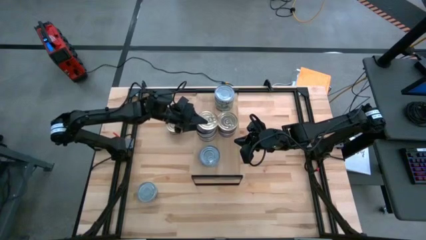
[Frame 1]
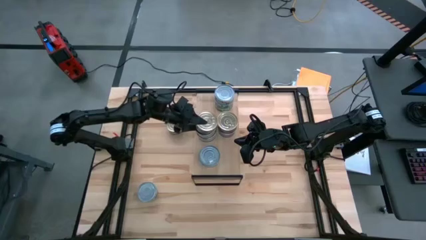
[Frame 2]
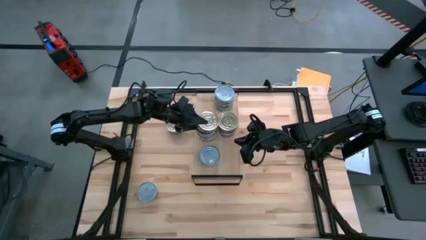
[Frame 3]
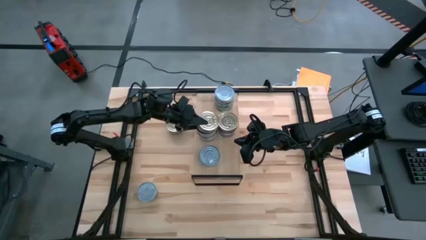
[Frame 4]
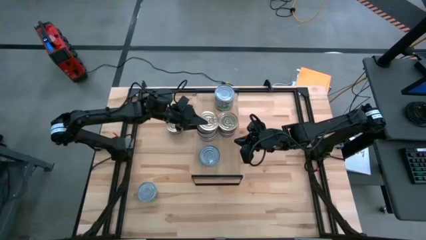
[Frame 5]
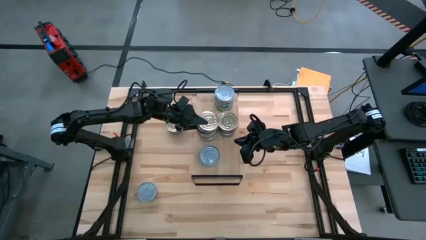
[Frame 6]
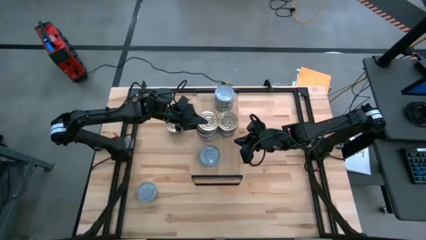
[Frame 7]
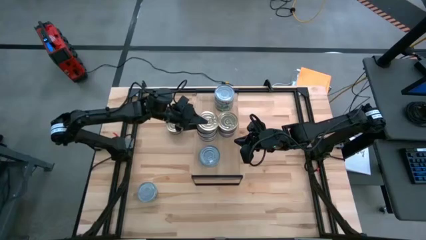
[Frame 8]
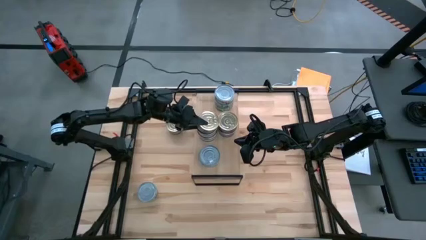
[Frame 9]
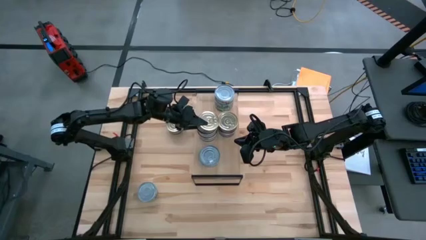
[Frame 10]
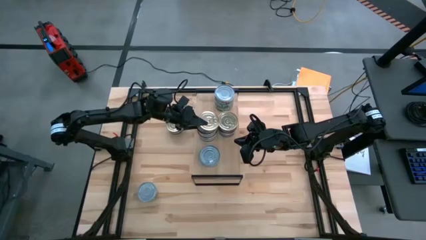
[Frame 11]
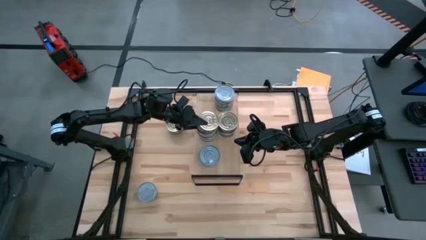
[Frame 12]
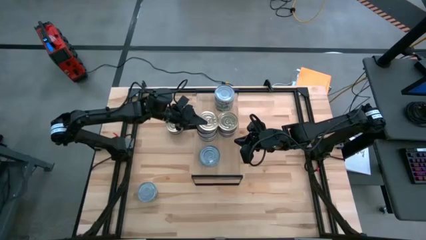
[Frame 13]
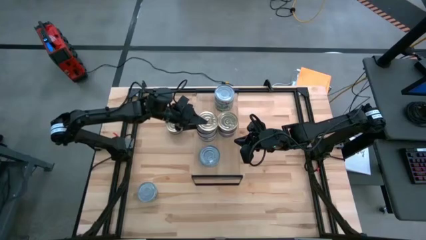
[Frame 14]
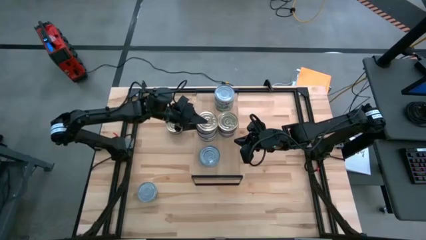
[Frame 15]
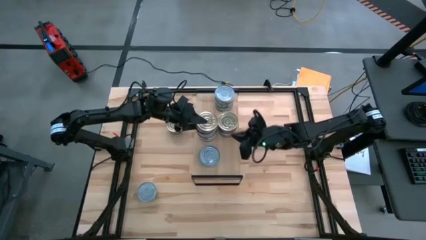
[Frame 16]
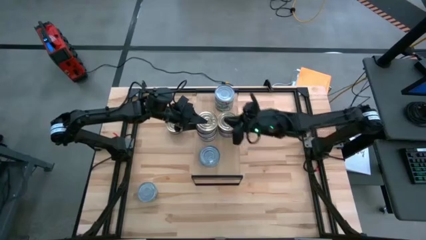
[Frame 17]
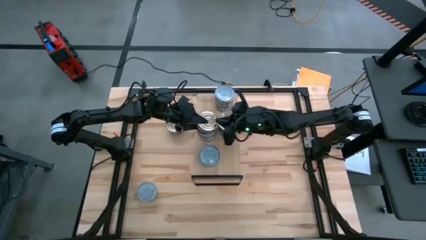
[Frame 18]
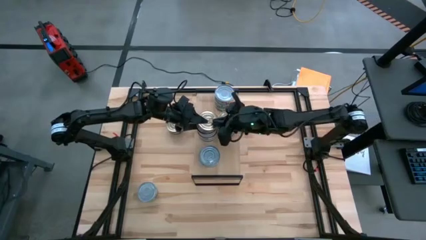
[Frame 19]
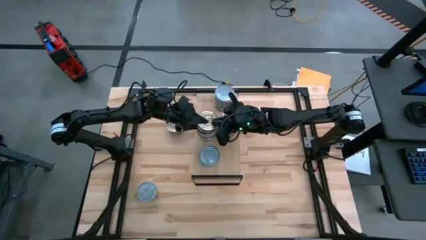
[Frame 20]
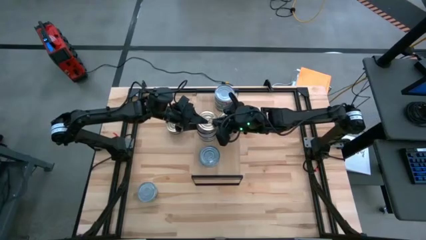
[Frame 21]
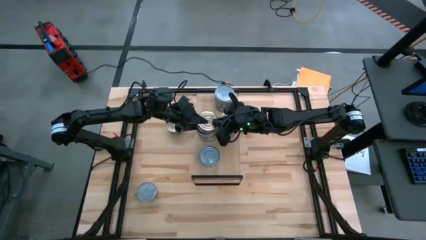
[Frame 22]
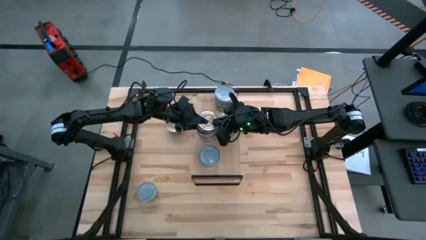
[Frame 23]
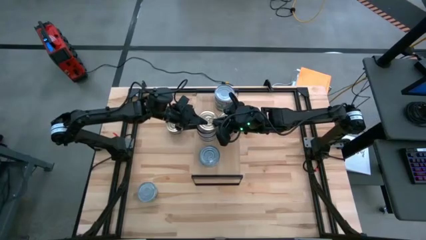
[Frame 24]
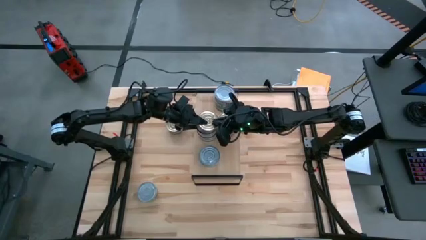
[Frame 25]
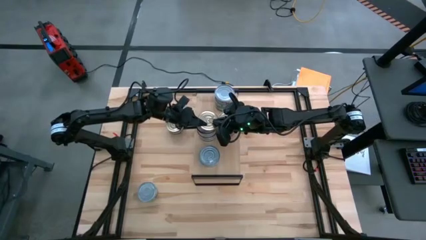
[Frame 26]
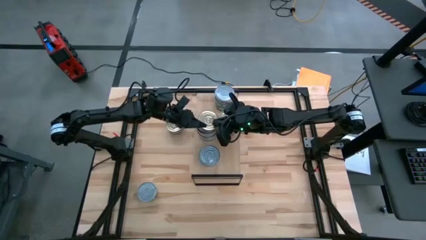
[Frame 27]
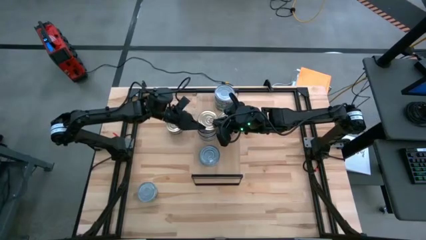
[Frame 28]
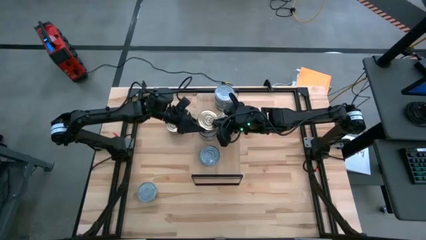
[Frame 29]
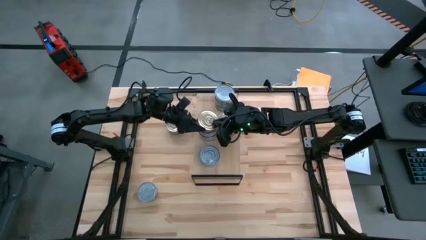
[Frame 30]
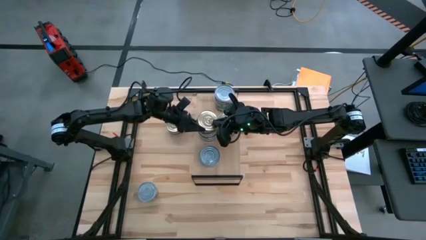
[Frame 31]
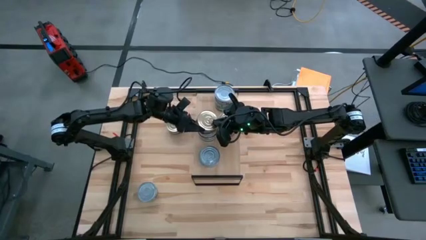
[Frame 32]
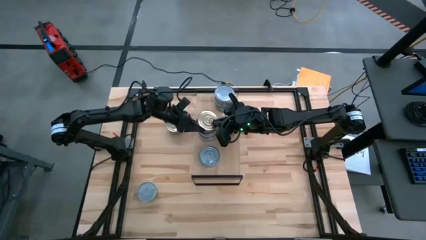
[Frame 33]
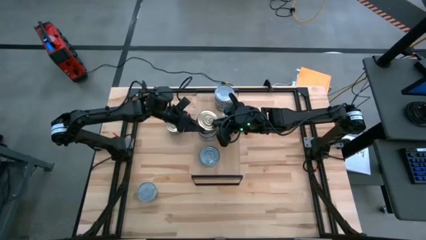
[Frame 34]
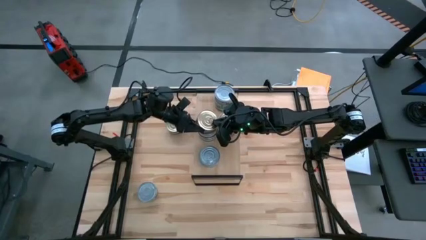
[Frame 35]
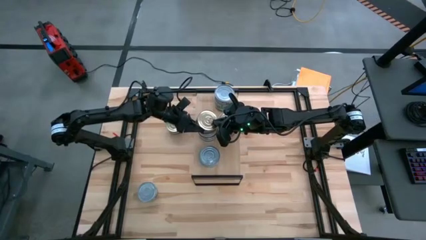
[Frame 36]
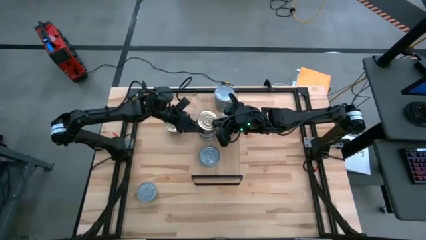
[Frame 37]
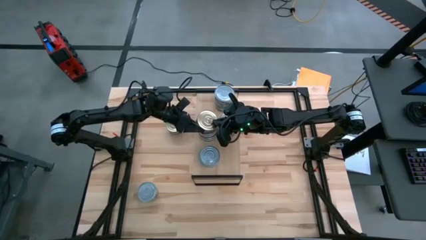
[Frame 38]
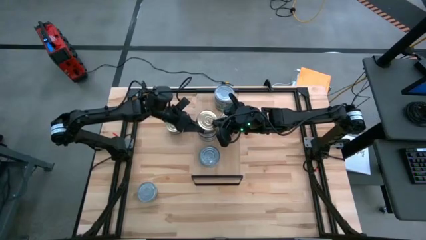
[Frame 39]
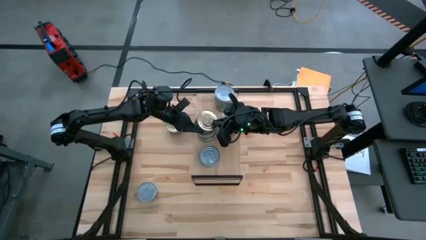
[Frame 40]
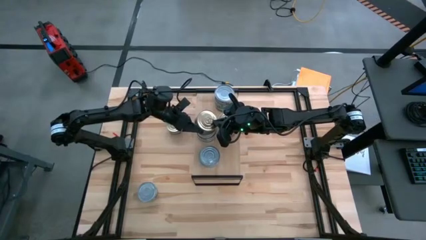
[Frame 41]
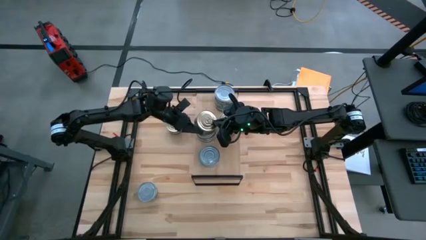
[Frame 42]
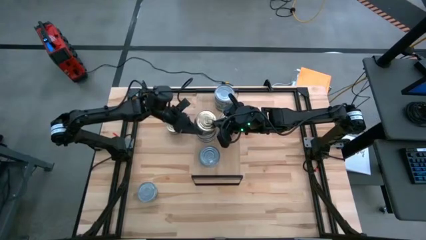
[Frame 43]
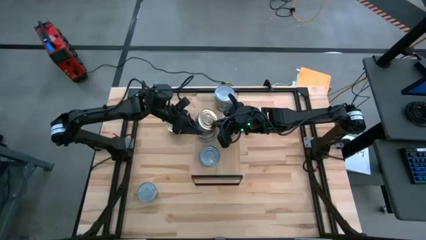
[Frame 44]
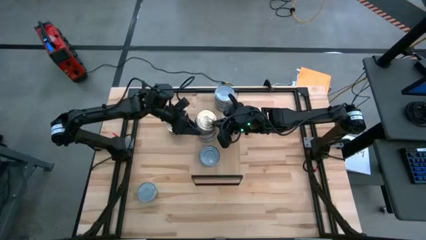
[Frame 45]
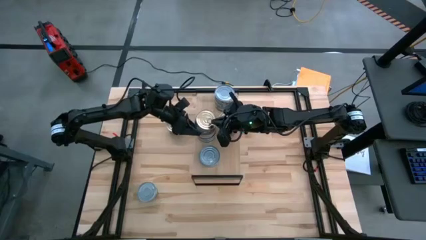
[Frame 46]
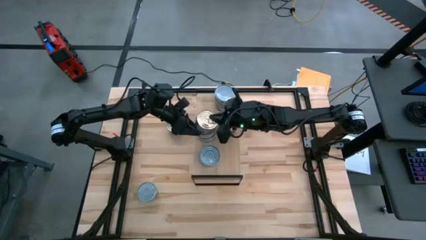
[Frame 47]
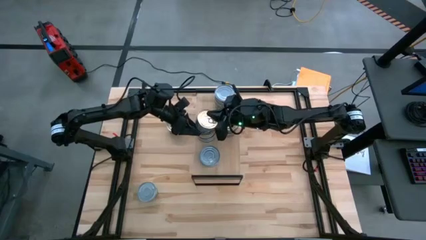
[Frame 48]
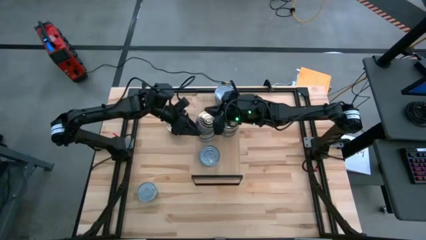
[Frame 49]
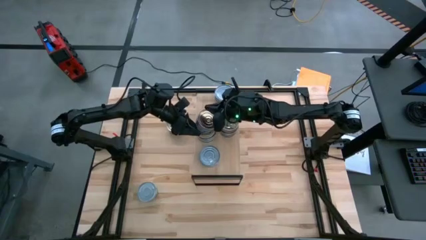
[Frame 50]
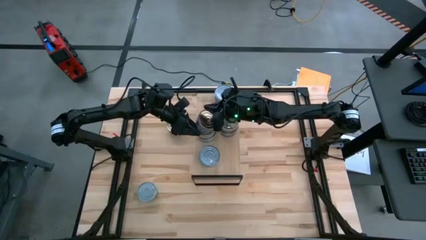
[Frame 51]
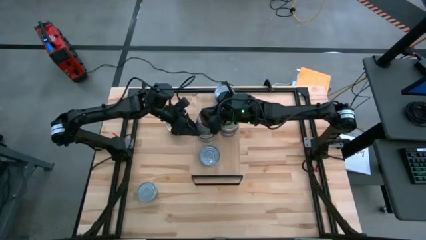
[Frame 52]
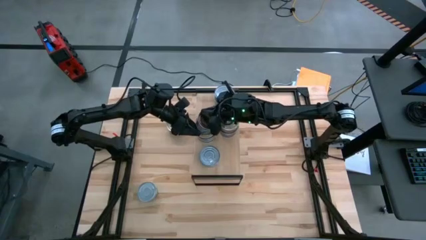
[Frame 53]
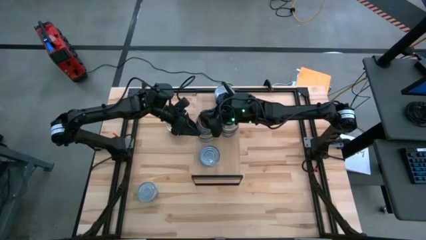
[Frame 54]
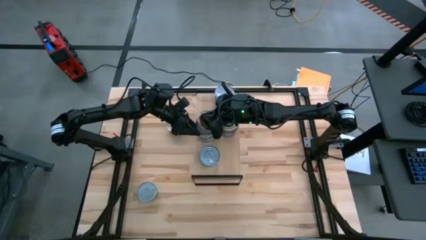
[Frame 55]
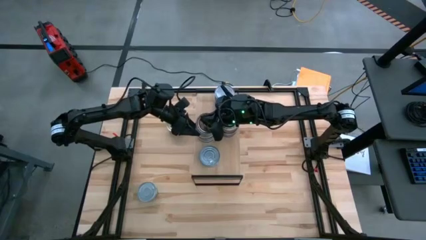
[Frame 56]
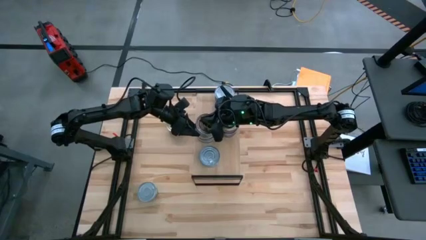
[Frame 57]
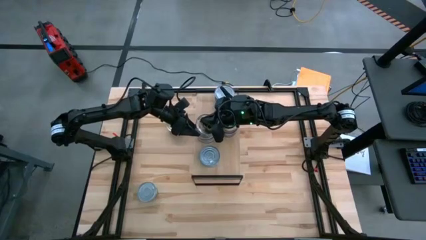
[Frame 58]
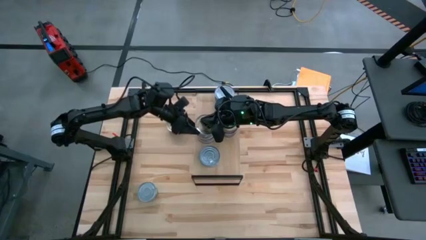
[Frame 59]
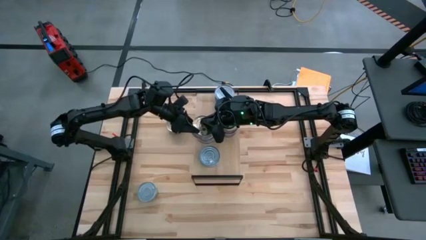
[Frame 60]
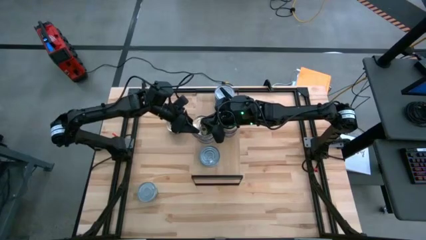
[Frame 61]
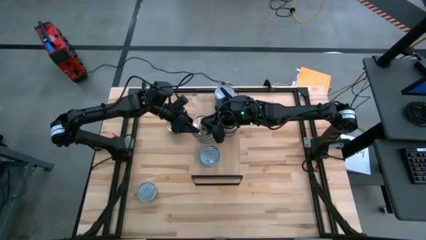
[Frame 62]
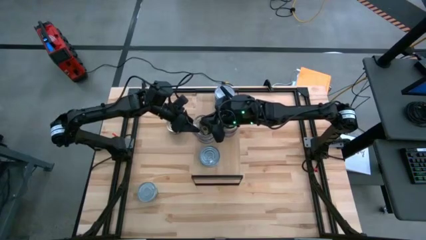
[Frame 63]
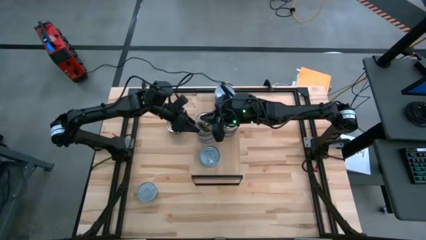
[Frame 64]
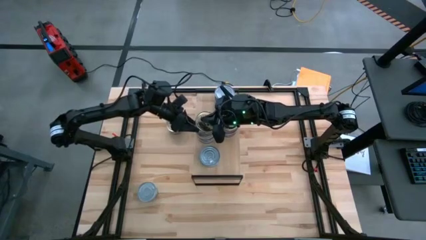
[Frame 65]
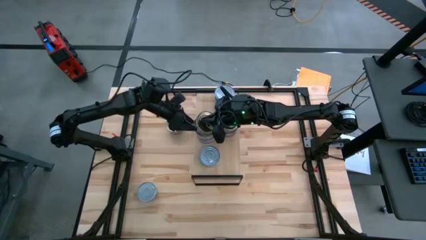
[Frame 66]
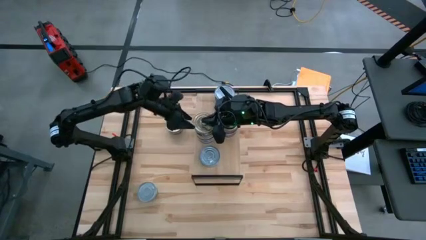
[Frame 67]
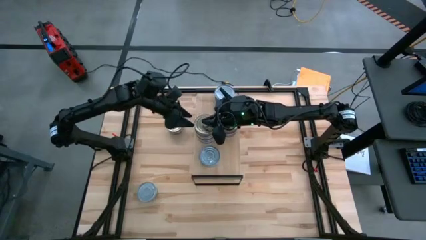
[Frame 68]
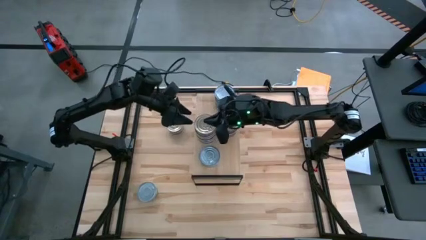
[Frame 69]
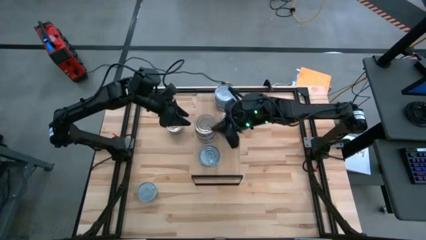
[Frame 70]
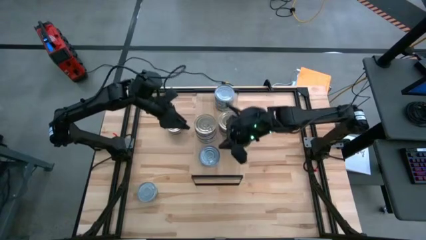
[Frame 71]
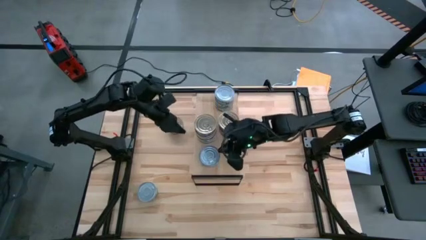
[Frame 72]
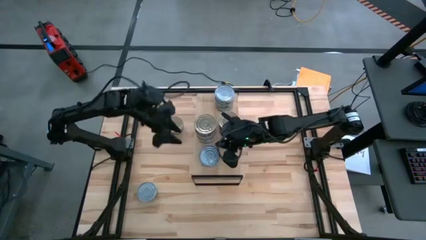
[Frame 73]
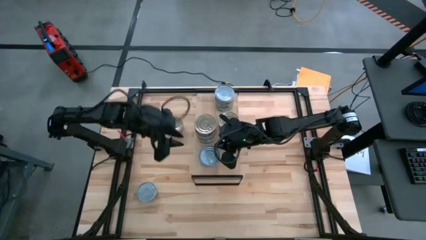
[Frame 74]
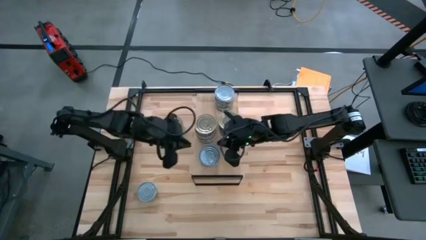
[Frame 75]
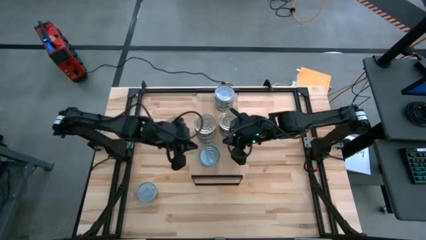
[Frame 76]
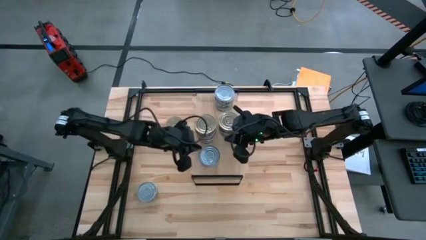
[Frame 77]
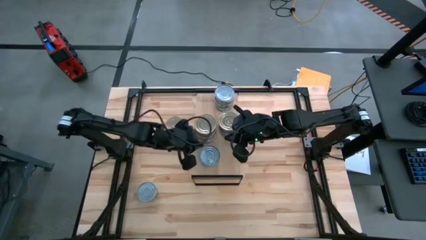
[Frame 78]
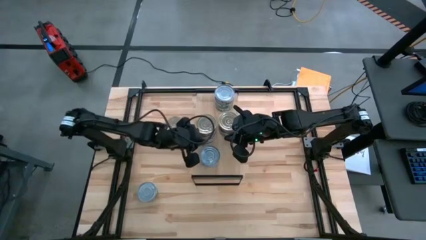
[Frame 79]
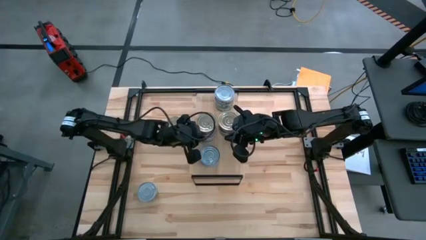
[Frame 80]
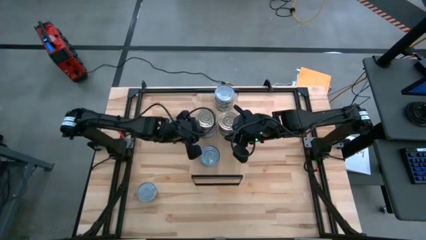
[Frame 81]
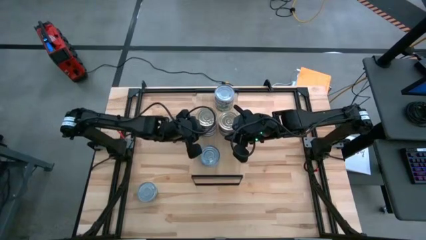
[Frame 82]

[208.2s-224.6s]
Task: Stack canned seafood by type on shelf
Stack the blue-pink tuna can on top of the blue-pink tuna can on the shelf aligned with the other blue-pink tuna can
